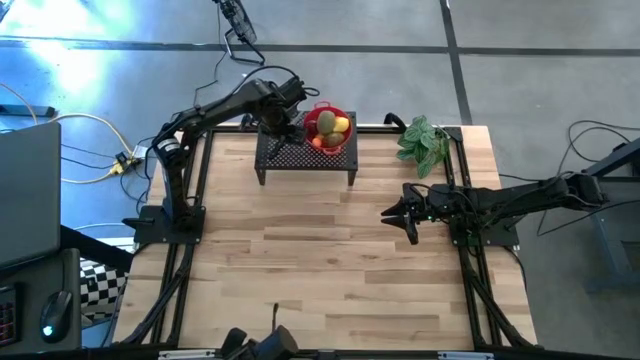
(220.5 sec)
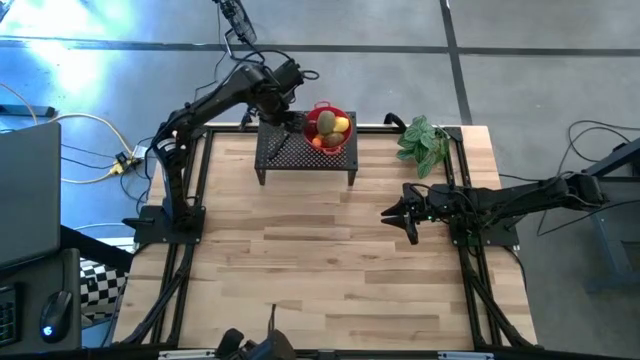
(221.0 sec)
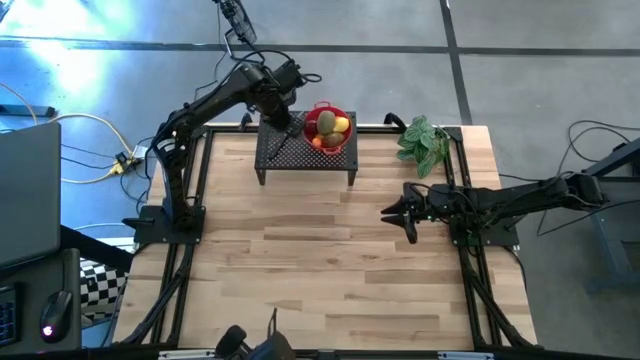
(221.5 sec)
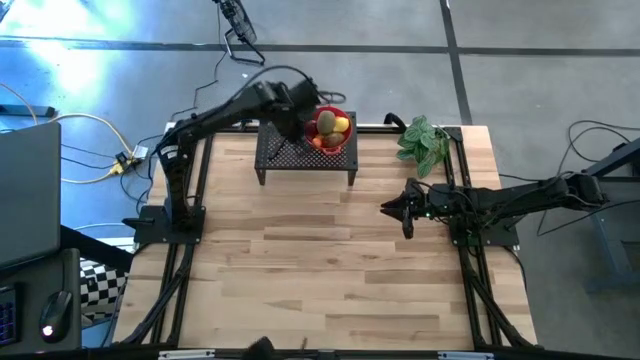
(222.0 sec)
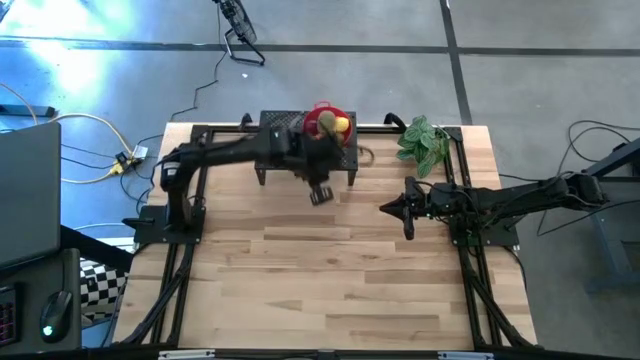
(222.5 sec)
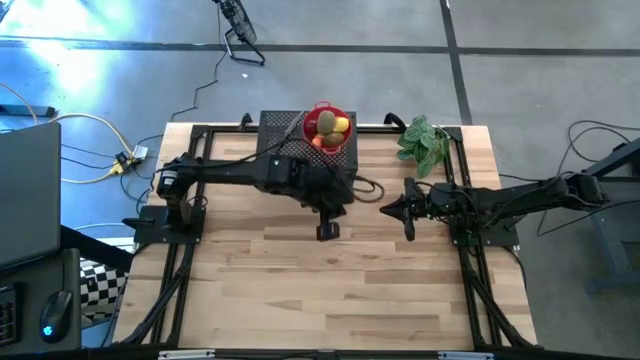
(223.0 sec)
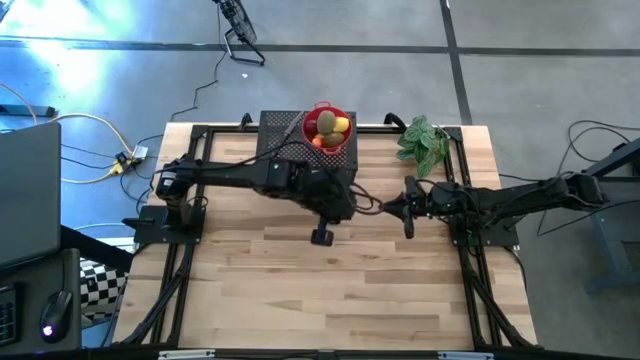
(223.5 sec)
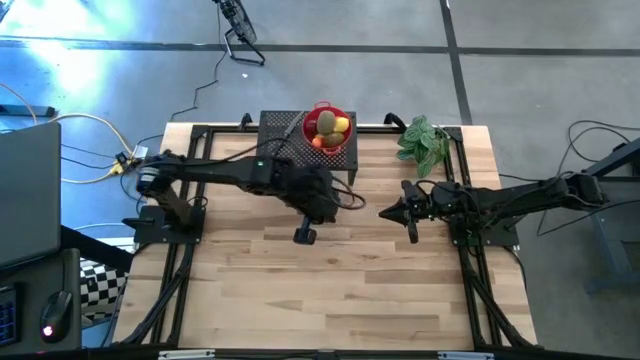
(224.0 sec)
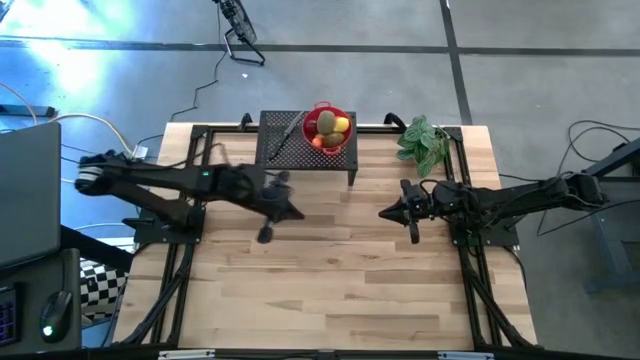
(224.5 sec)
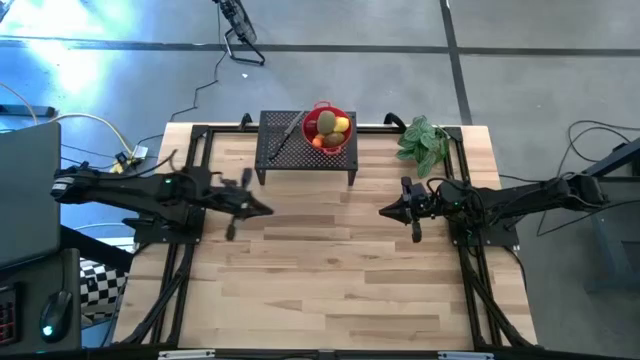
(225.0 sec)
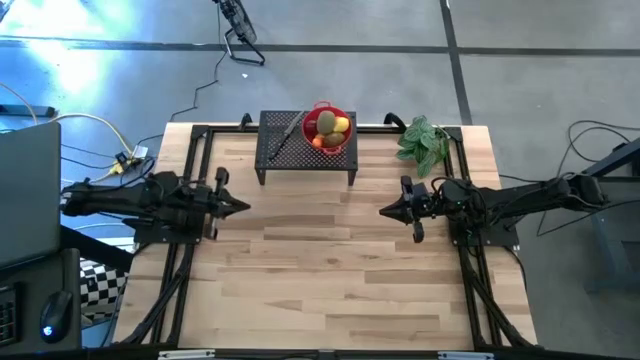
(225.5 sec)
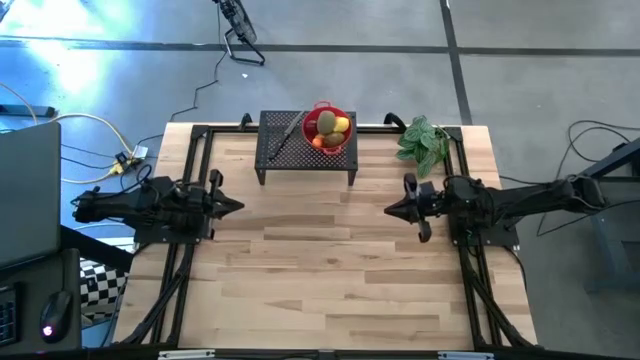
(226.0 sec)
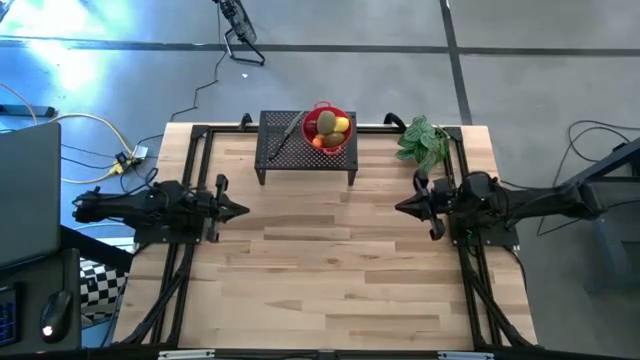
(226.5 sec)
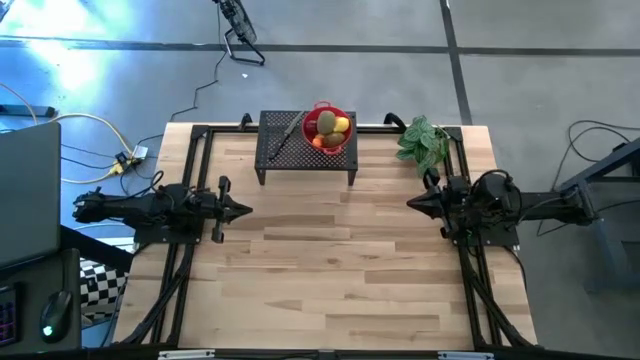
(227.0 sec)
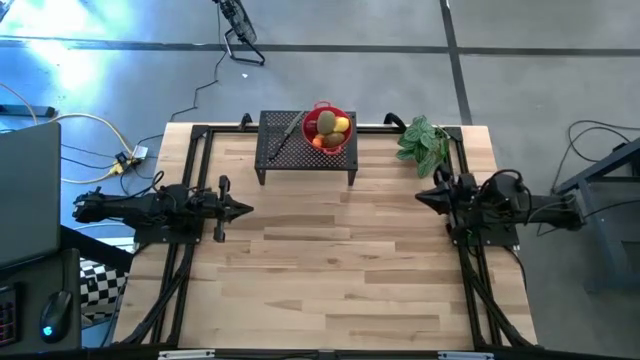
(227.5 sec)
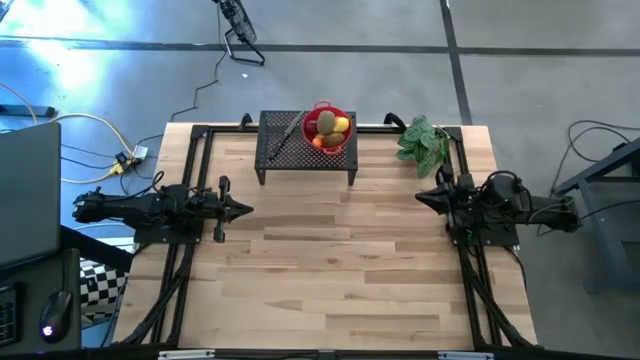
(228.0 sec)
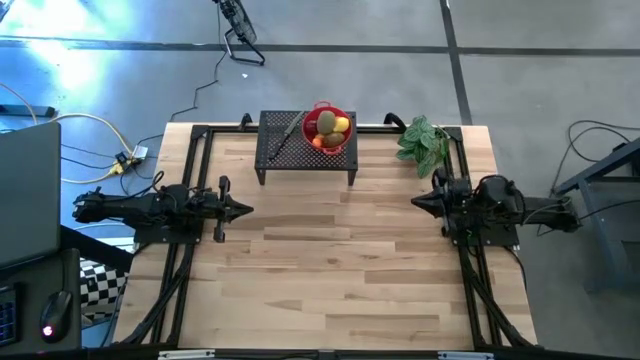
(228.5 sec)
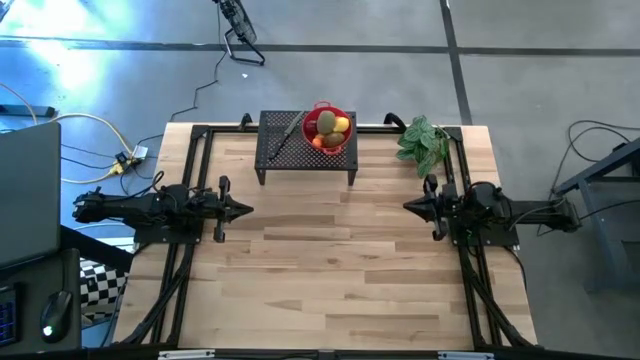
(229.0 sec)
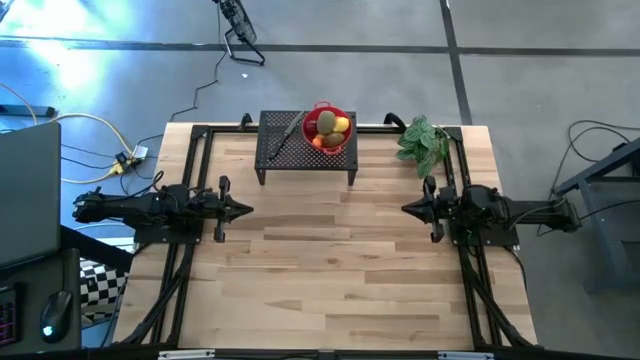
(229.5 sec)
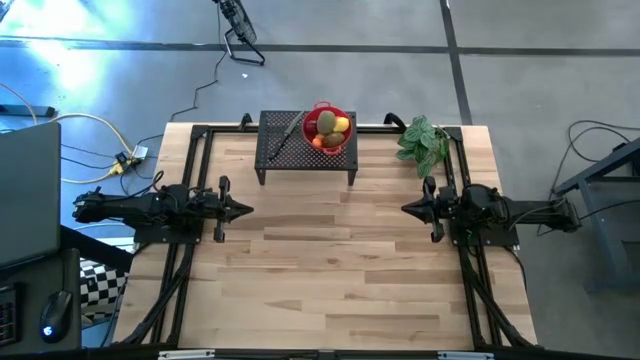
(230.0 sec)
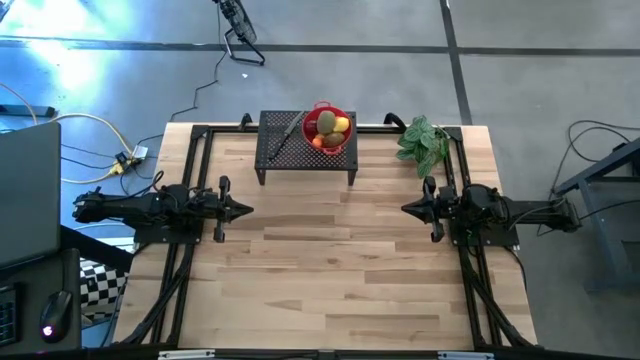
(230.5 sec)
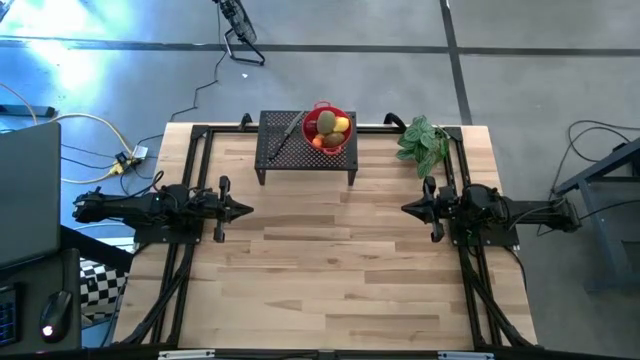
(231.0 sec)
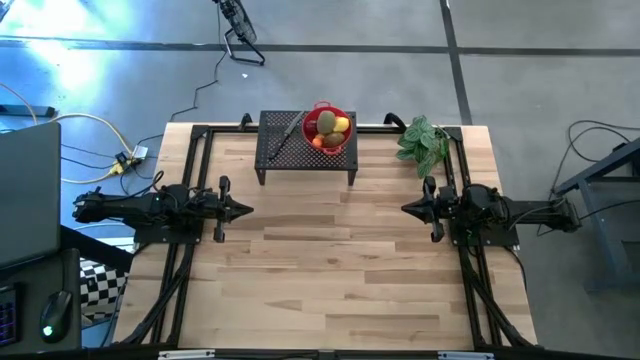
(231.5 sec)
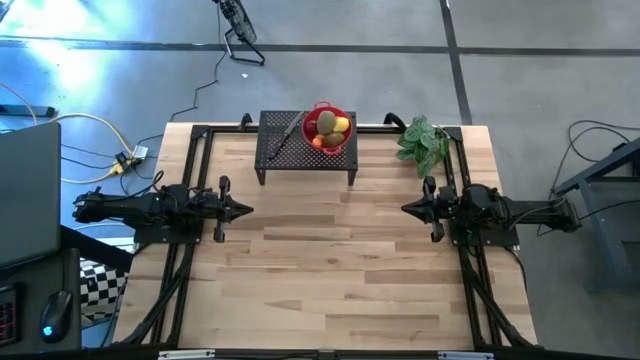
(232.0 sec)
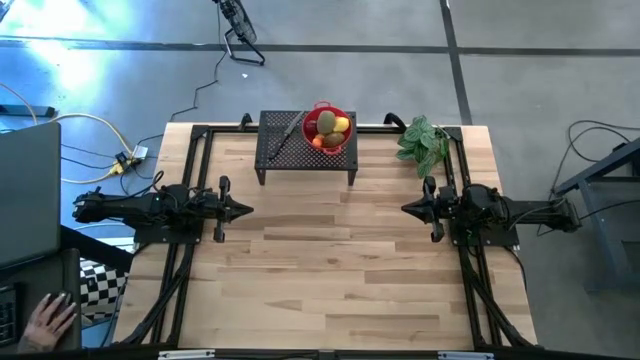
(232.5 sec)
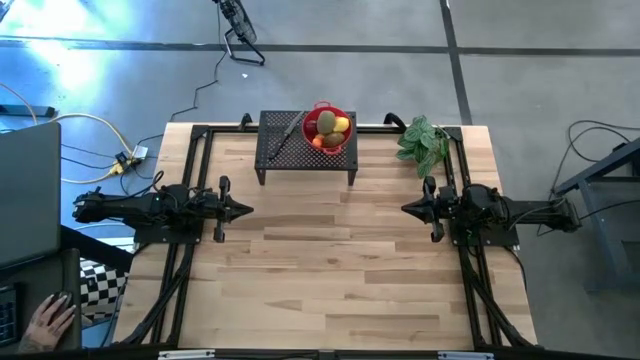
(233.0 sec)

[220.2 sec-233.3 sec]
Task: Pick & Place Fruit
Return to Home Position

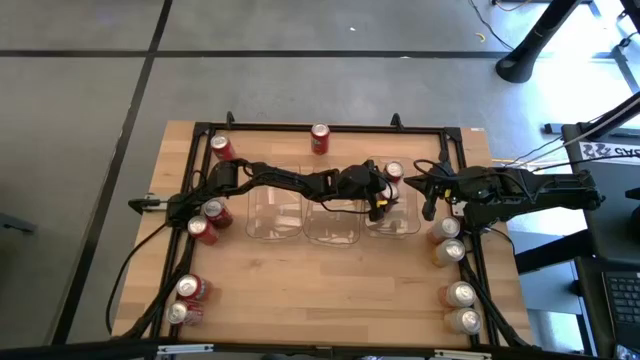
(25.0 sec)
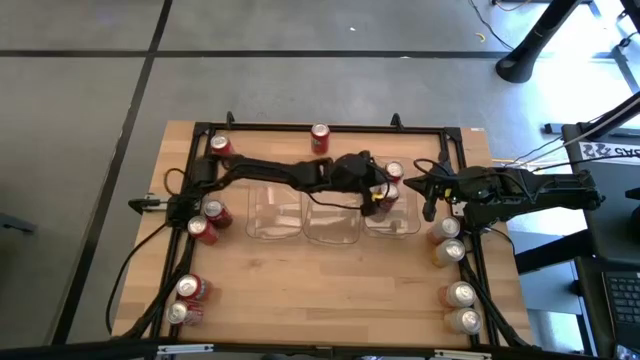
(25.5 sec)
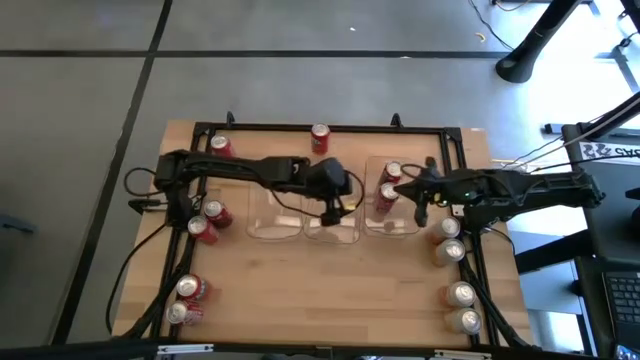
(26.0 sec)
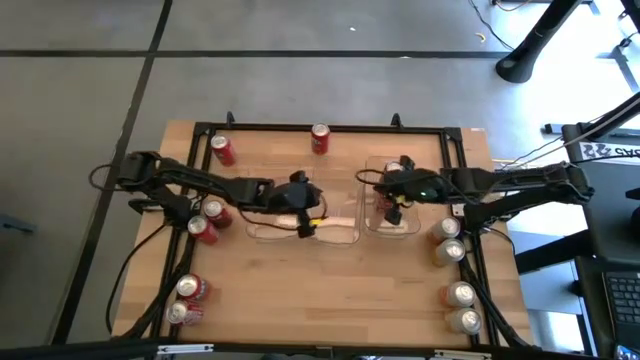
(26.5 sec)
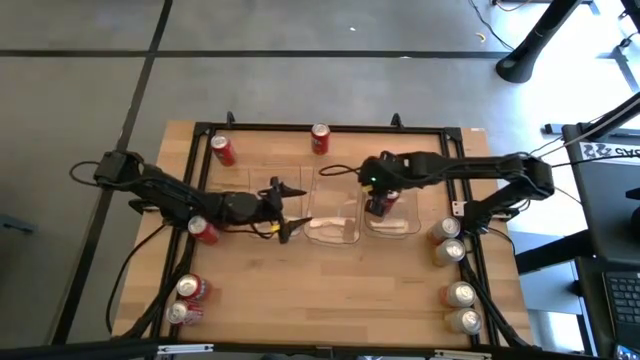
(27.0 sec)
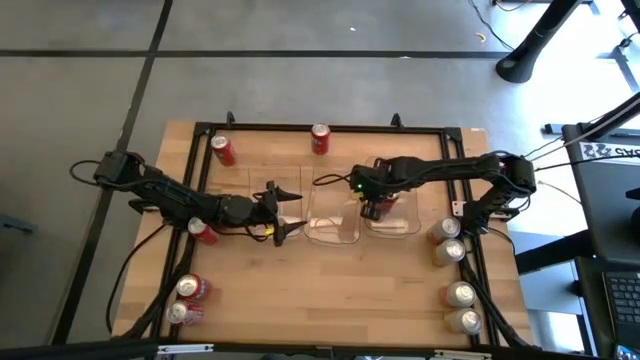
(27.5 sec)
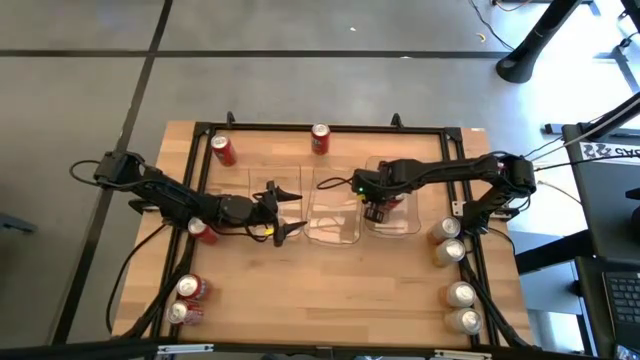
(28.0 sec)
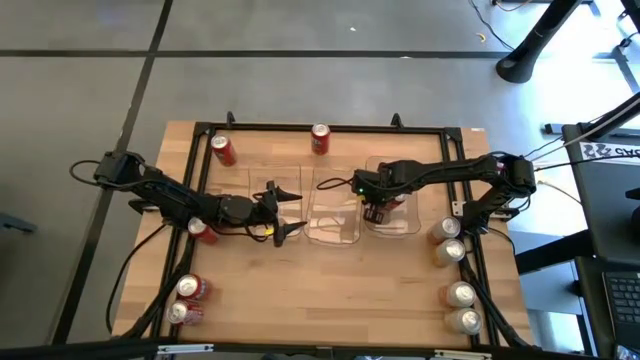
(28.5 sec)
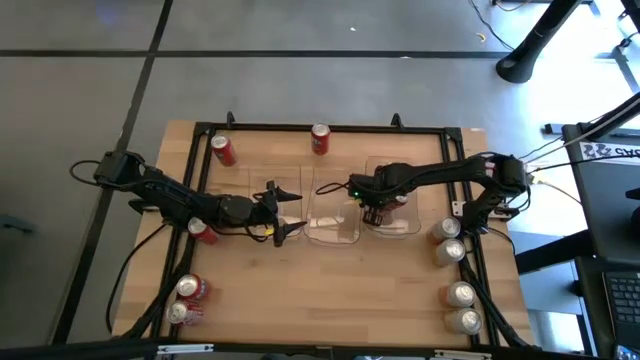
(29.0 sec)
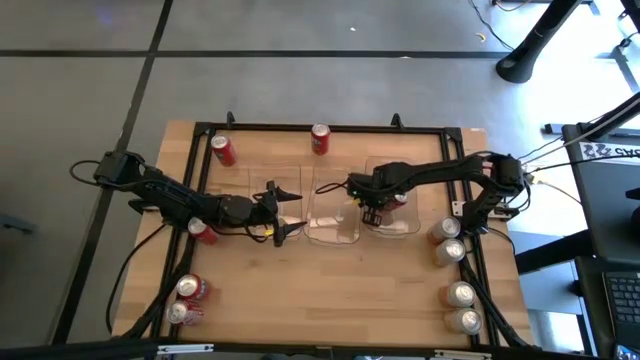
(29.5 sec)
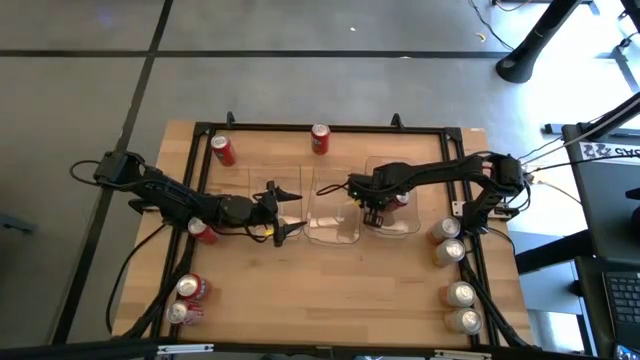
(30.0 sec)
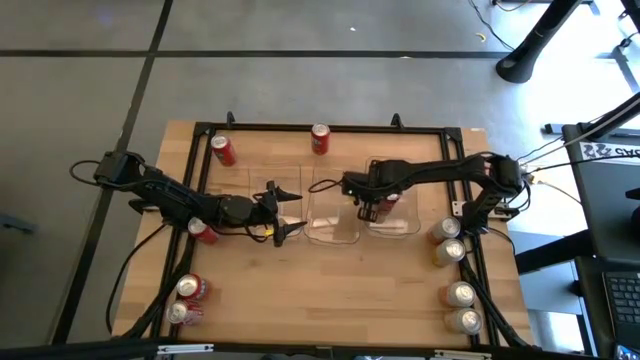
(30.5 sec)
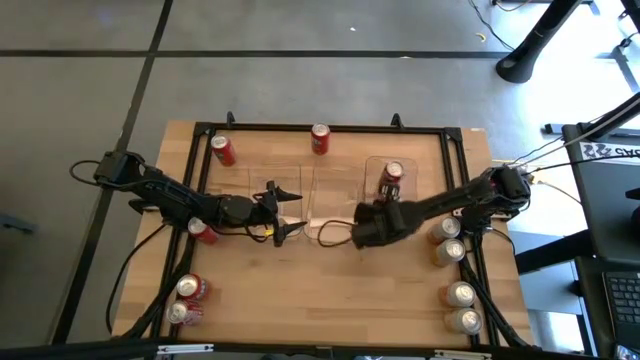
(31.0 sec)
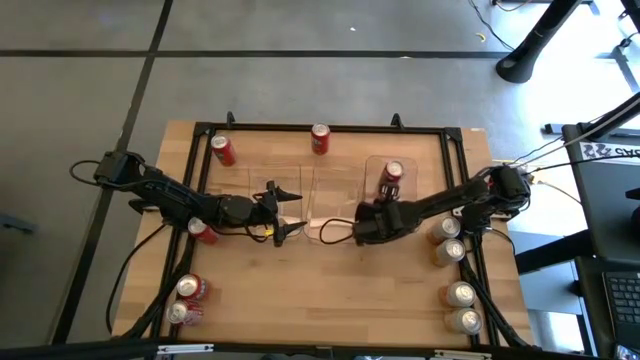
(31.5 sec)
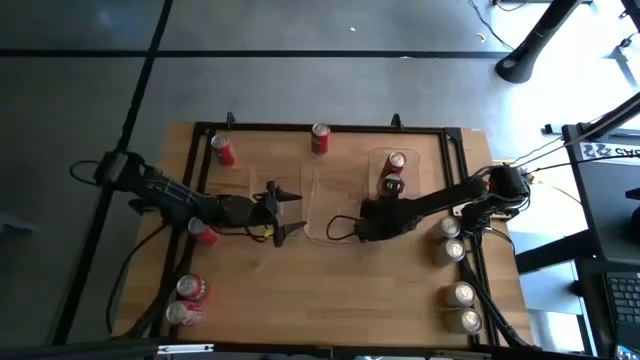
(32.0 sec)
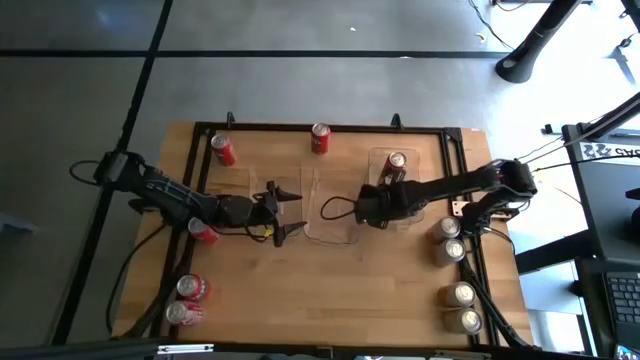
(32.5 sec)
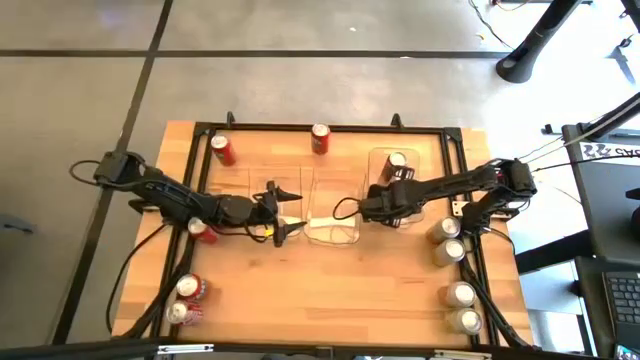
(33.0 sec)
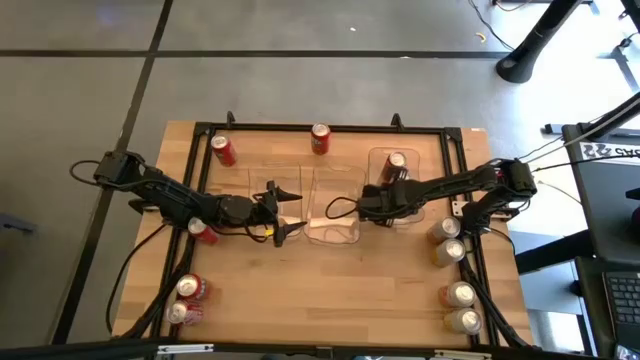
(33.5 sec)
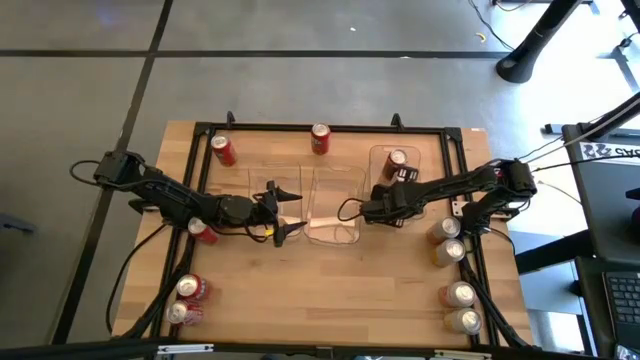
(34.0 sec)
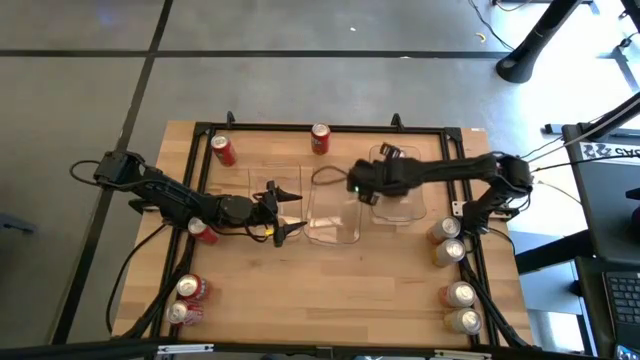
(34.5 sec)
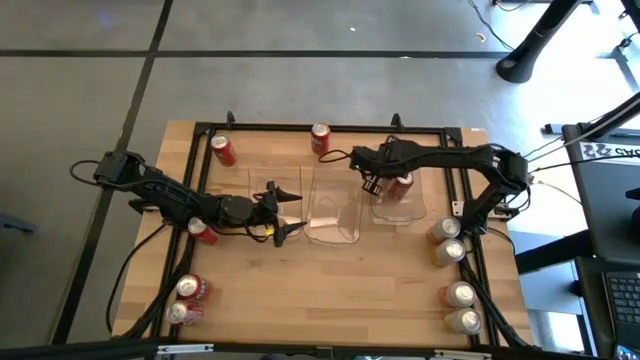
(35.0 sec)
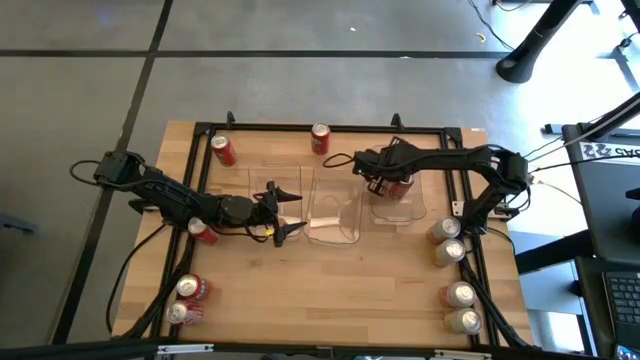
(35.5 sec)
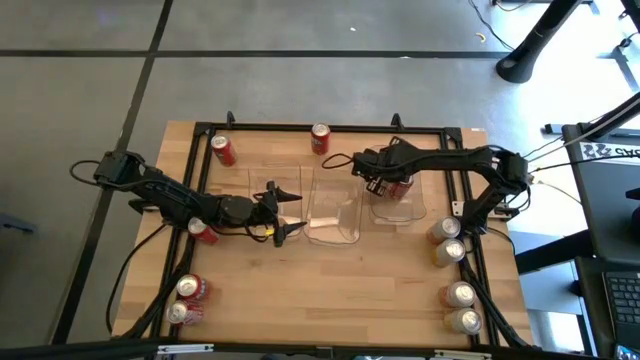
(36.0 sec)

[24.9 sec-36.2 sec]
Task: Sort soda cans
Adjust the red soda cans in the right transparent bin
